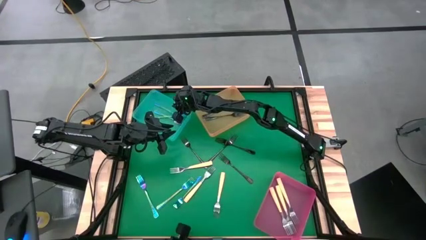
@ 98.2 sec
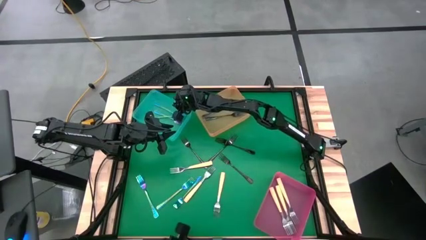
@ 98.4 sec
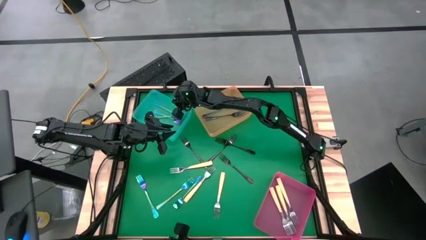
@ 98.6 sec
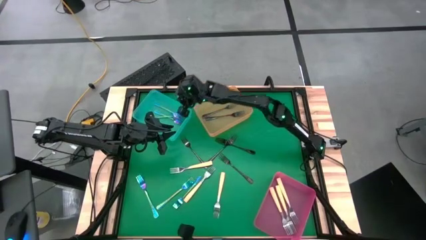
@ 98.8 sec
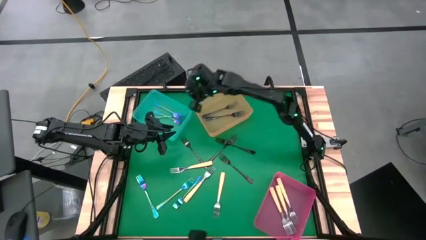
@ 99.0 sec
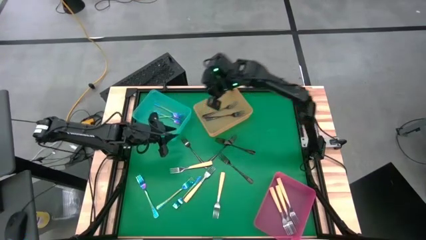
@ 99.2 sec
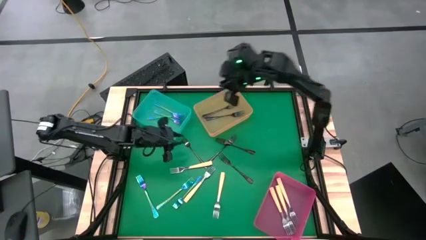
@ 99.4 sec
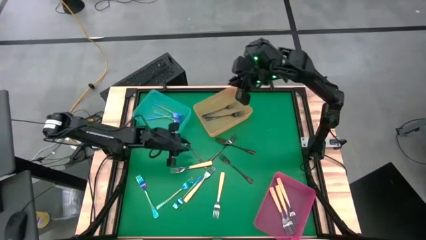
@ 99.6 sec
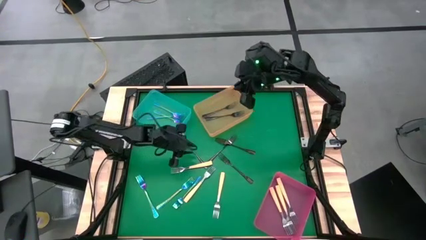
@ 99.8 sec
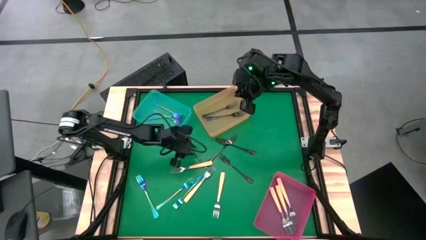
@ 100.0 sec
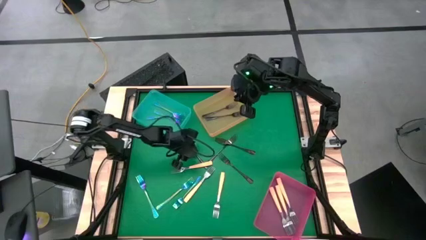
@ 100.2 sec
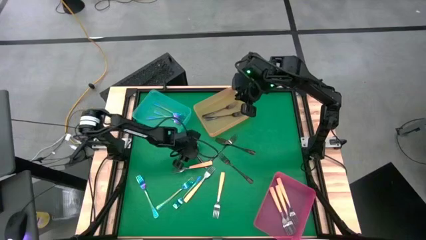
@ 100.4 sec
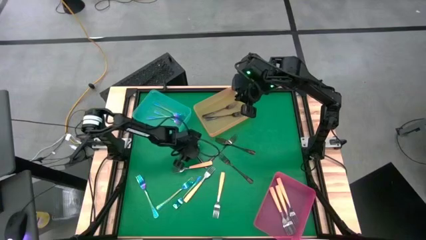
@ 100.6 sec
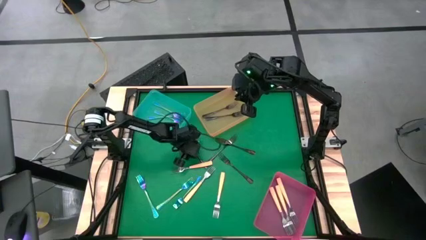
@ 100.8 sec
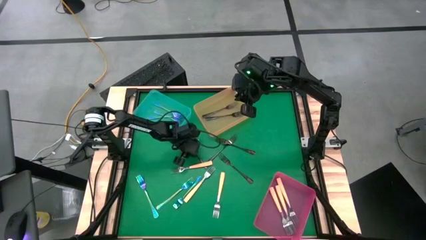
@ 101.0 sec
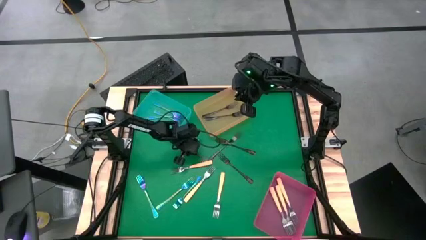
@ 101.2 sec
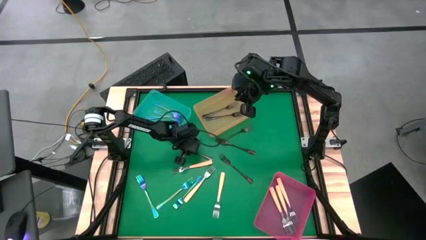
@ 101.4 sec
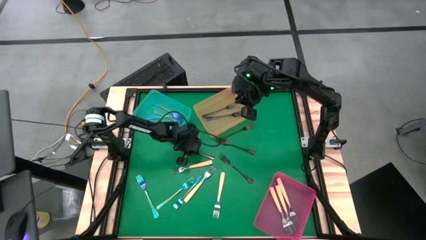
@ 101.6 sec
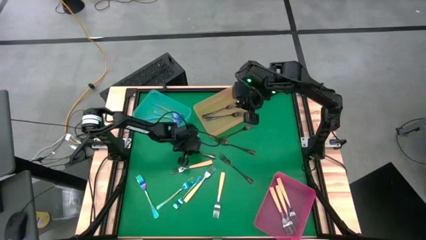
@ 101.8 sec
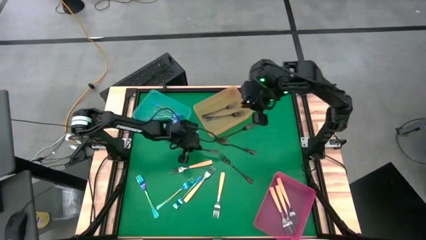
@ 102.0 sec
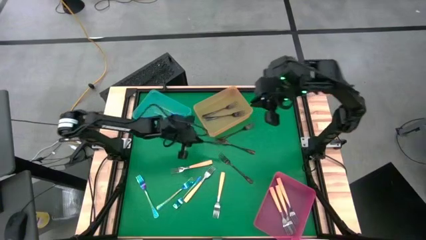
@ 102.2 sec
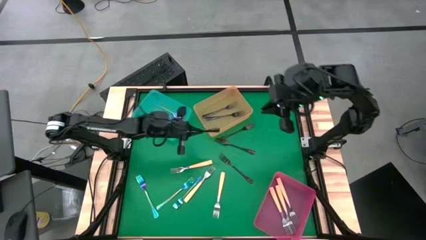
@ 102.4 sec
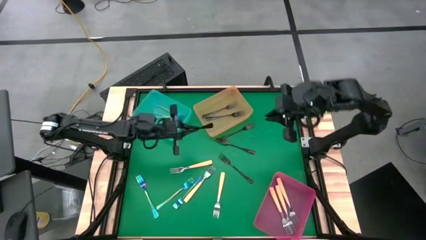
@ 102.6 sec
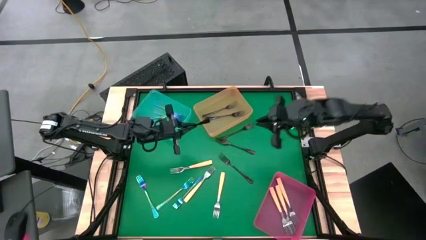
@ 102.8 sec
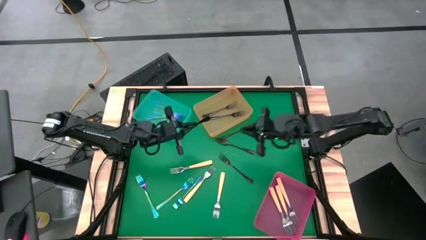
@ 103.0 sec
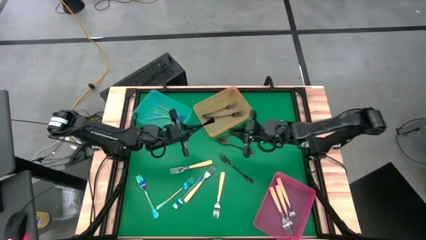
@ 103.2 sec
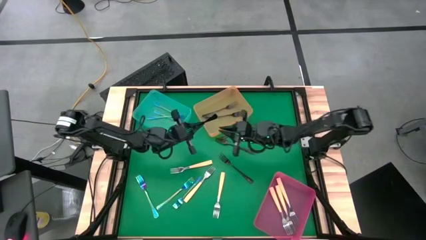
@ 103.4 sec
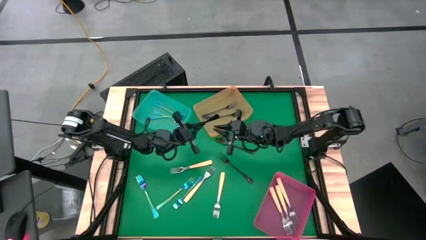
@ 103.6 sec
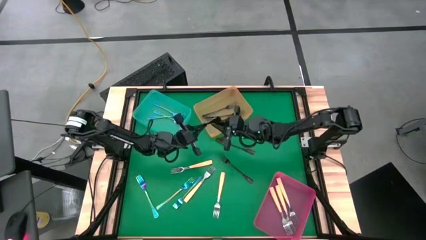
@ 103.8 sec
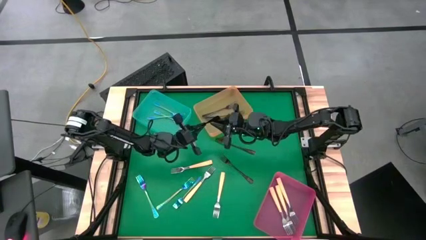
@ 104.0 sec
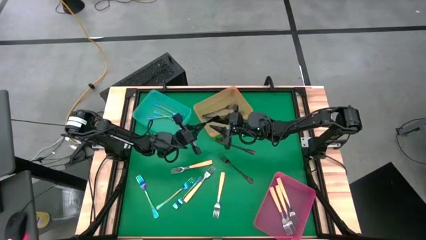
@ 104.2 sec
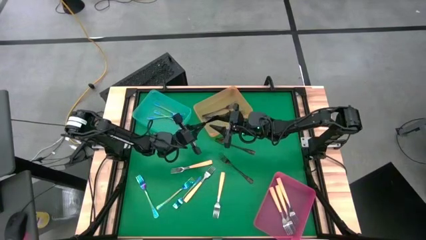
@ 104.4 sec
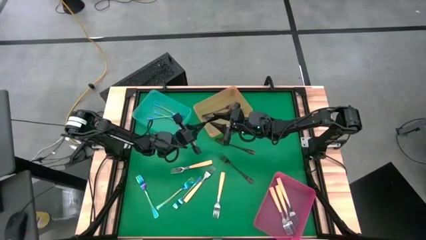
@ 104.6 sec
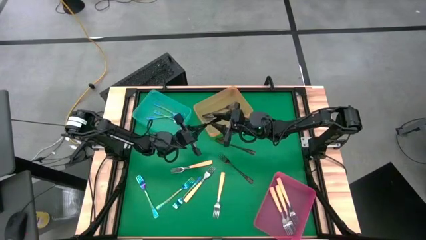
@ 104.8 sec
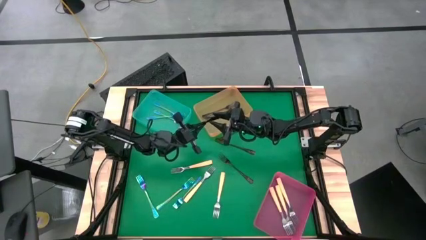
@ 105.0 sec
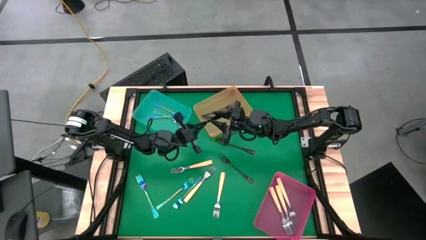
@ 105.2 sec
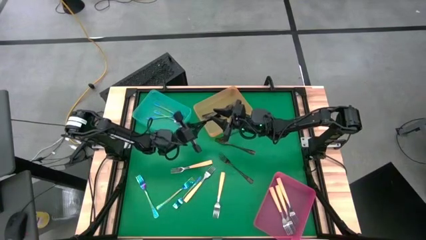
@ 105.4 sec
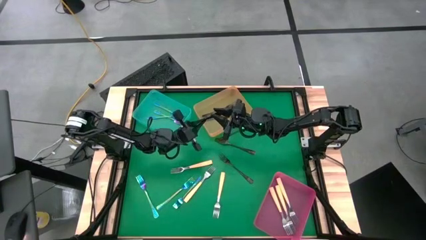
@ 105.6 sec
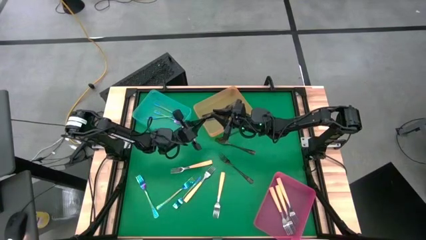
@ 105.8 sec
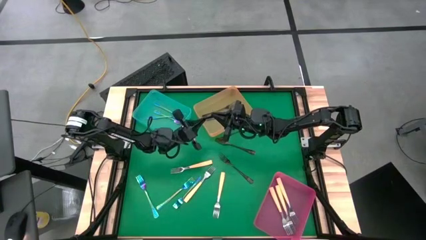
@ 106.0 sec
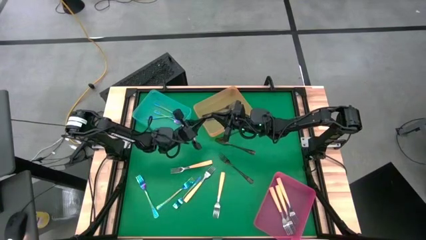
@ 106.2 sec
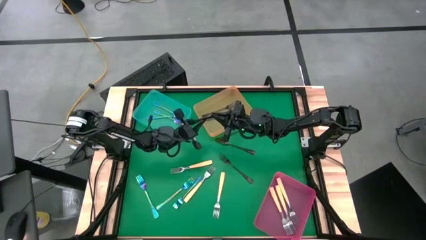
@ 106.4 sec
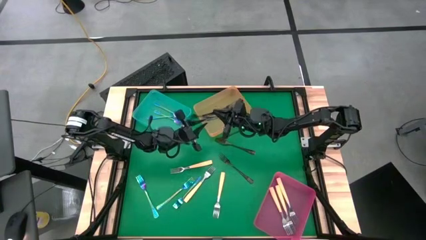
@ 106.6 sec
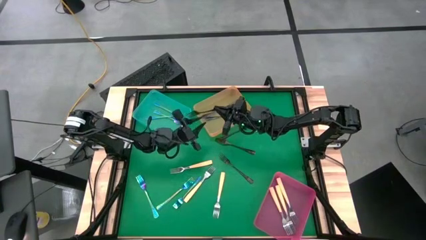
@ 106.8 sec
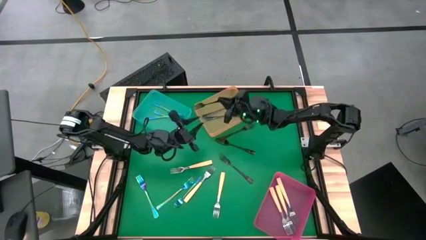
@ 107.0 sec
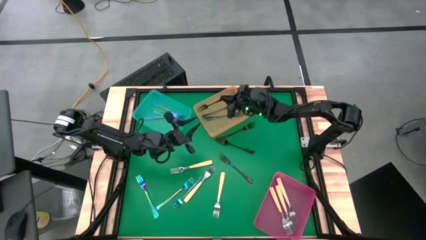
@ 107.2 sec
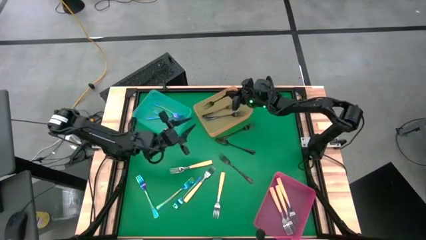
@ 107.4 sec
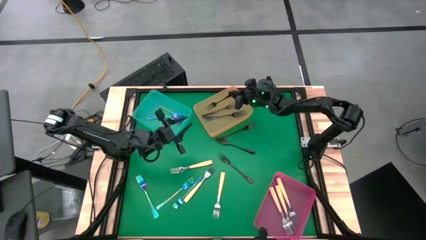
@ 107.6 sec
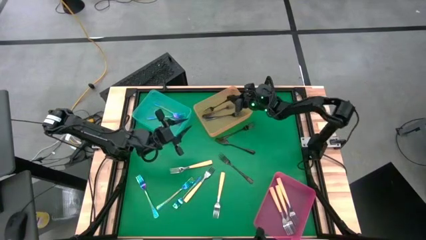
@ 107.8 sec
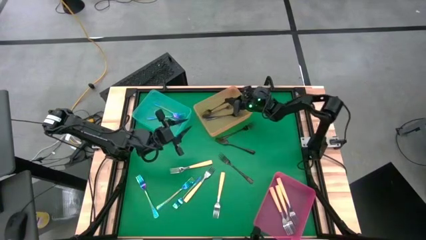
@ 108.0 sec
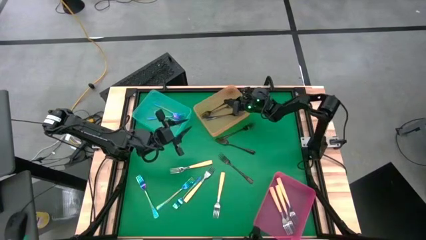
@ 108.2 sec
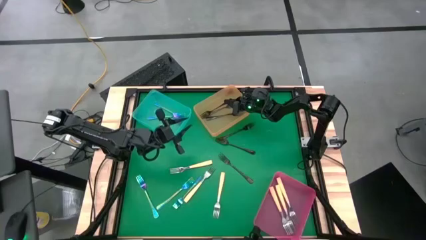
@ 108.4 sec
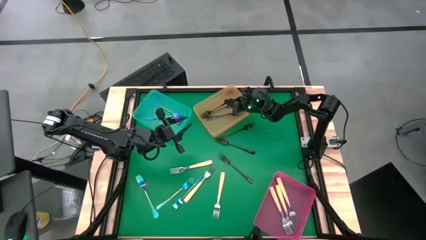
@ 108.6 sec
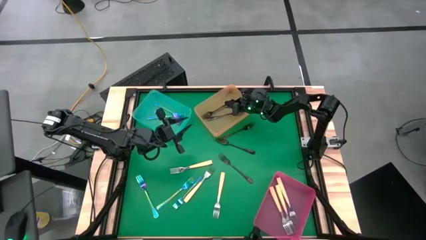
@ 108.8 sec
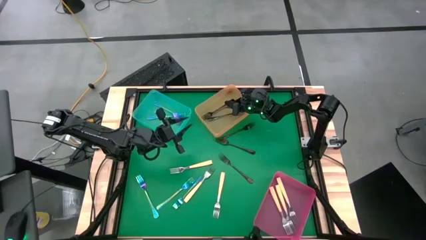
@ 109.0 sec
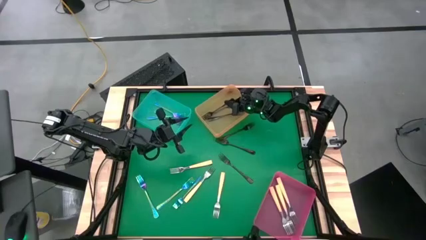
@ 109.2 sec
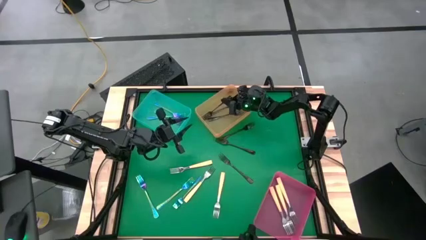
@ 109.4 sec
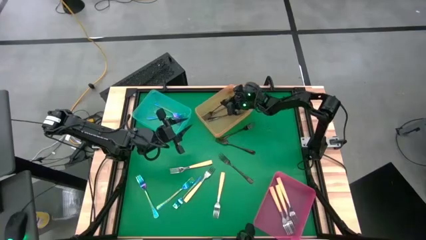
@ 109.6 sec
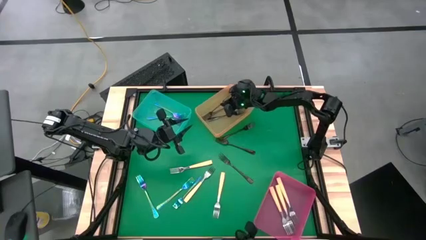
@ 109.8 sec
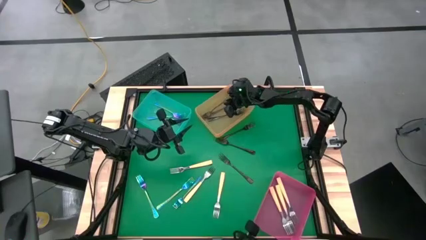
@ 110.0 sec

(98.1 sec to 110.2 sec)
Task: Sort silverware by color (type)
Put the black fork into the yellow bin

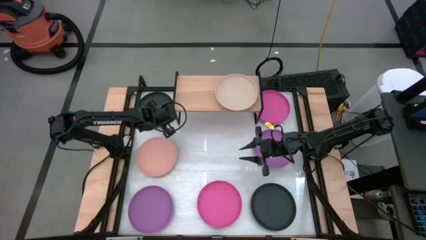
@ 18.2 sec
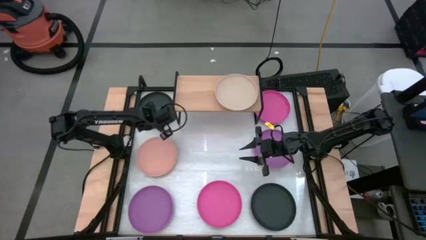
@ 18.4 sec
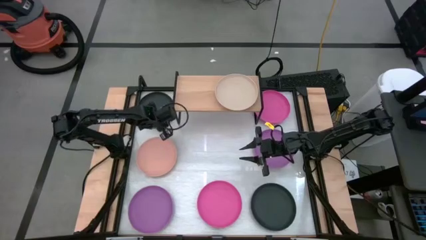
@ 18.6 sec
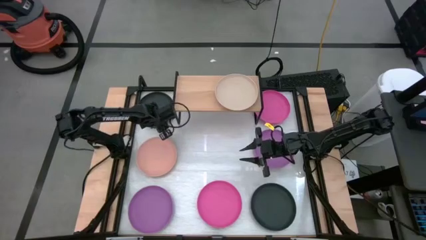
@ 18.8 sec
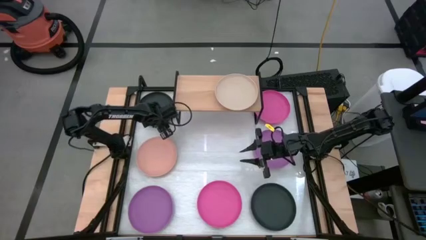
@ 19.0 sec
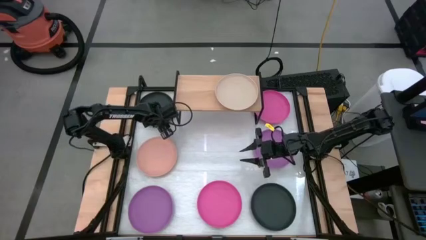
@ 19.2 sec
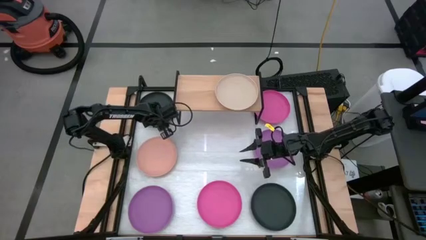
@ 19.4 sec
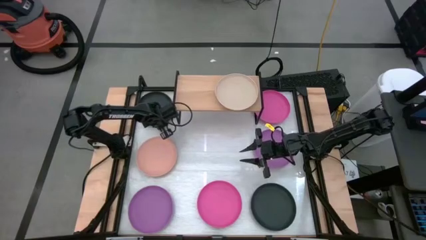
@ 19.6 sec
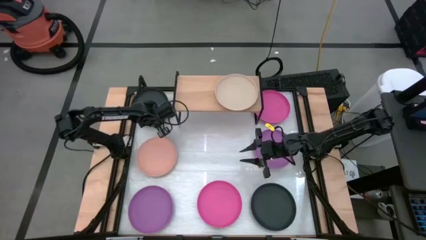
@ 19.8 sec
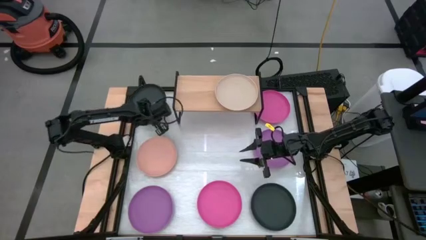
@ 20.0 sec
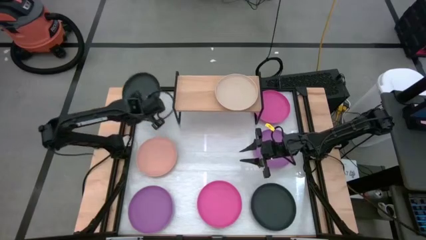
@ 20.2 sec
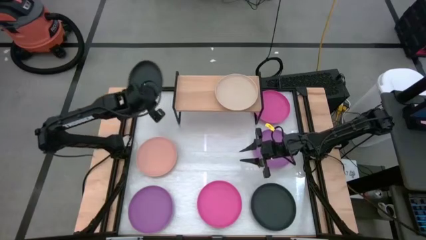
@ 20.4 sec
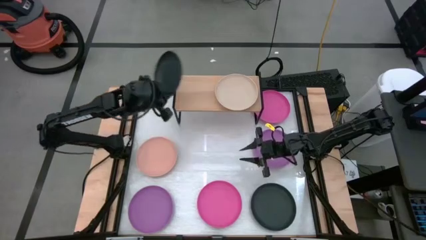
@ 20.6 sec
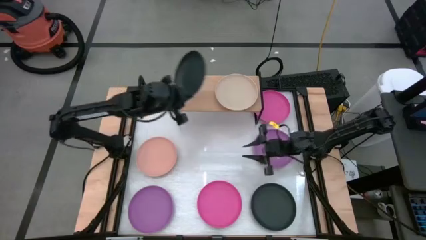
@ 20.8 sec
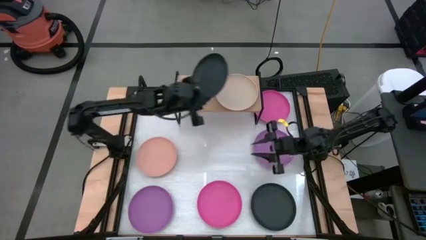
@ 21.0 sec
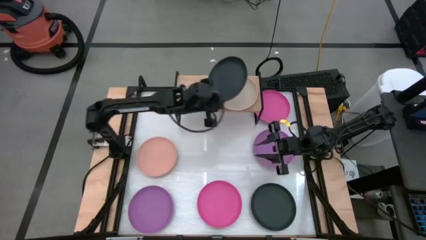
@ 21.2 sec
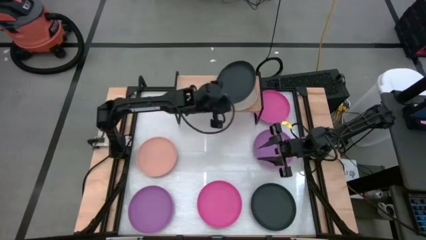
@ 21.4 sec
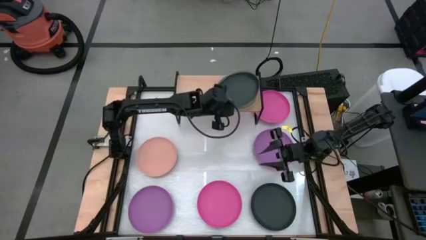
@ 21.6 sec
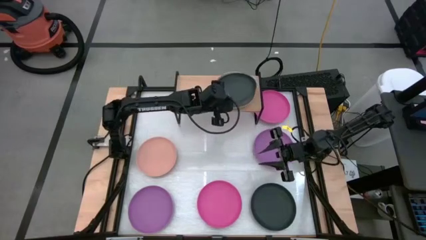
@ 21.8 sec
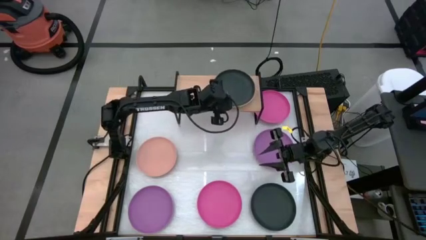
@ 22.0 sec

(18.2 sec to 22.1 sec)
Task: Place and stack plates onto a shelf
Stack the top black plate on top of the gray plate on the shelf
